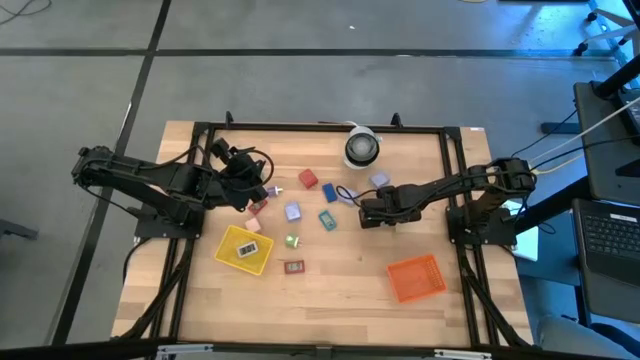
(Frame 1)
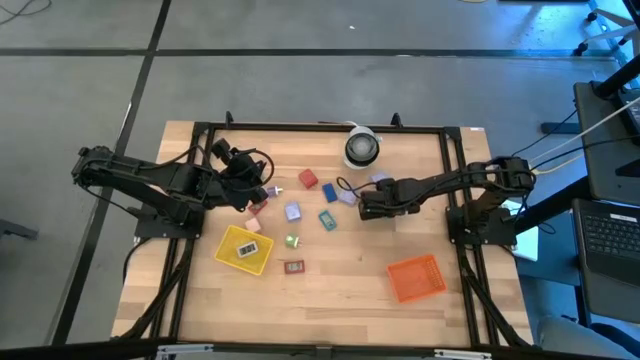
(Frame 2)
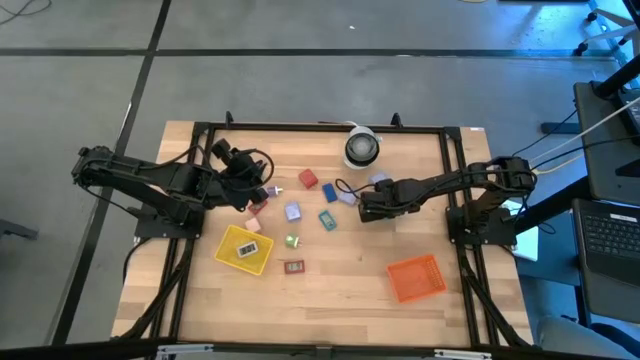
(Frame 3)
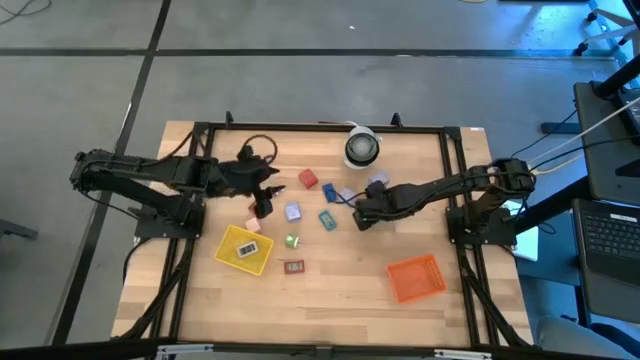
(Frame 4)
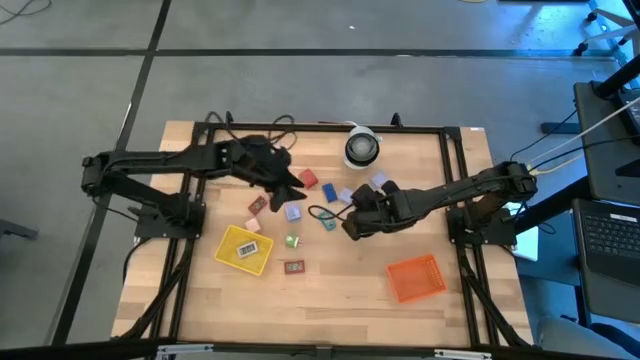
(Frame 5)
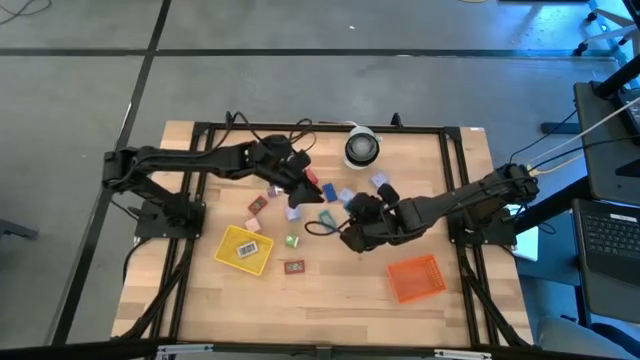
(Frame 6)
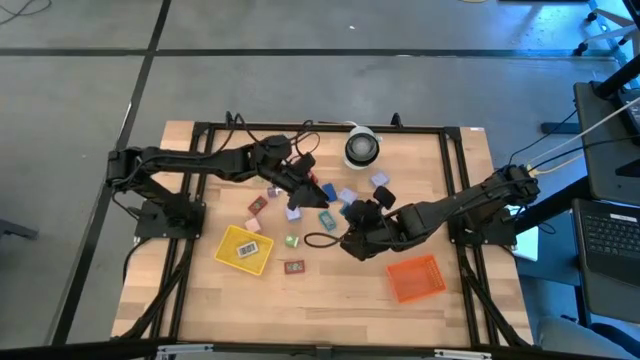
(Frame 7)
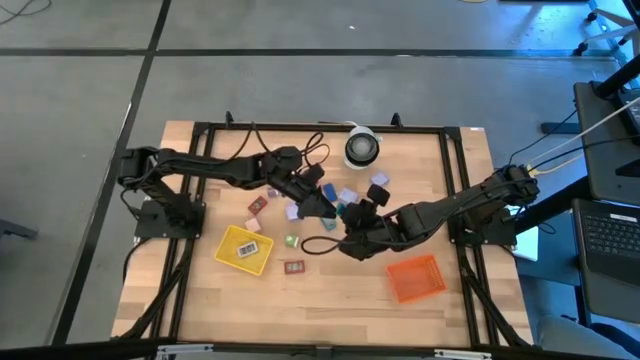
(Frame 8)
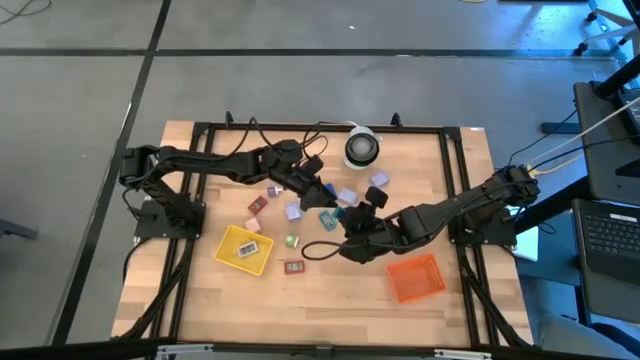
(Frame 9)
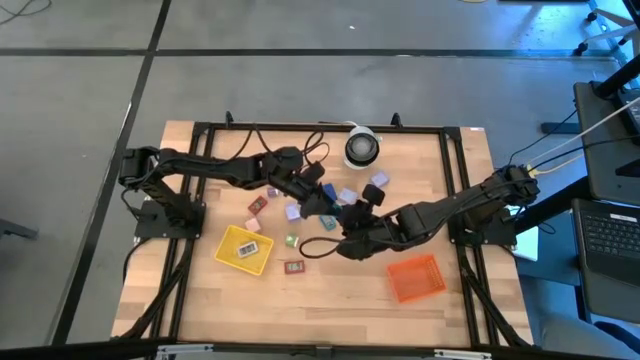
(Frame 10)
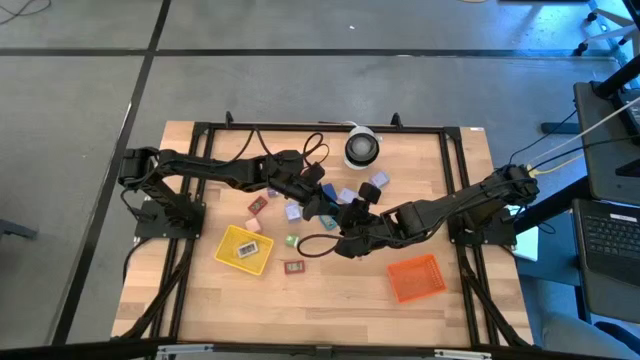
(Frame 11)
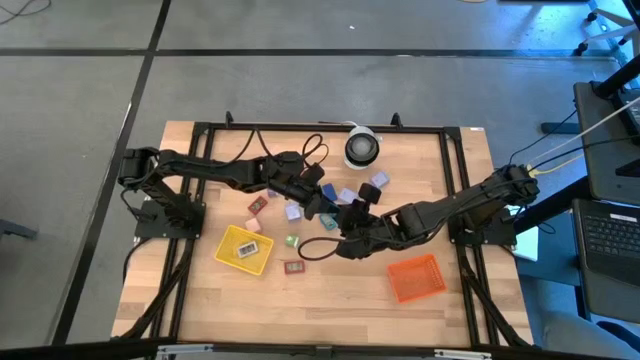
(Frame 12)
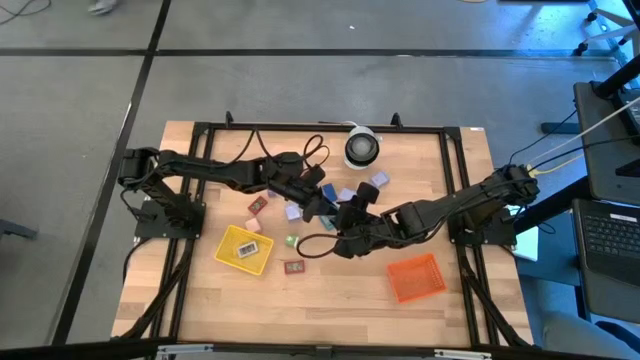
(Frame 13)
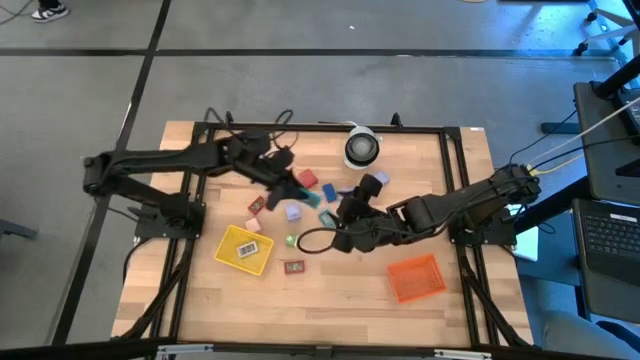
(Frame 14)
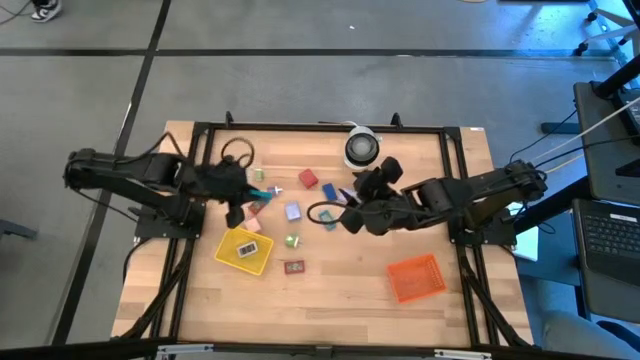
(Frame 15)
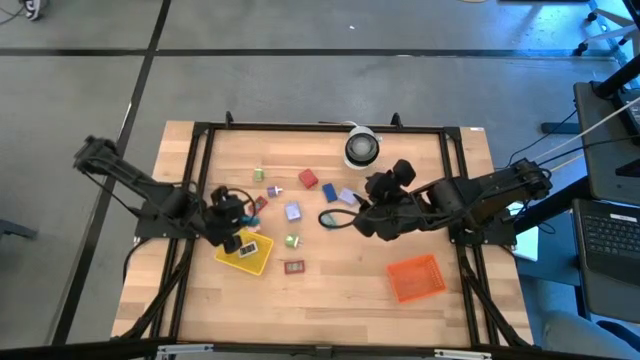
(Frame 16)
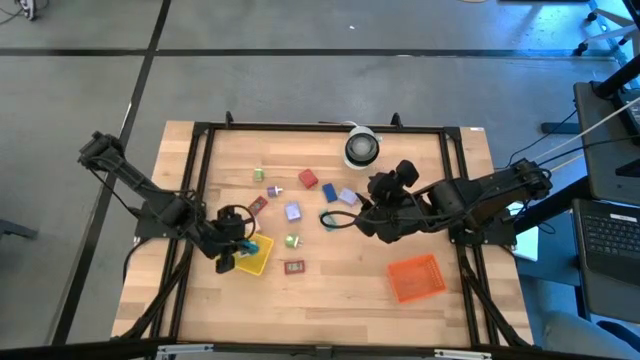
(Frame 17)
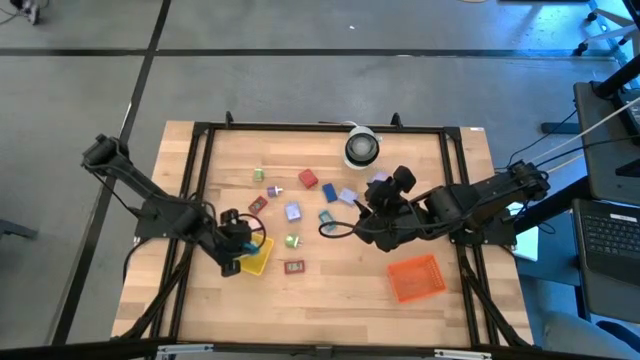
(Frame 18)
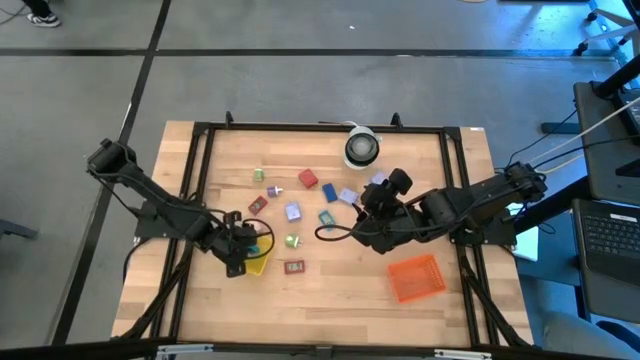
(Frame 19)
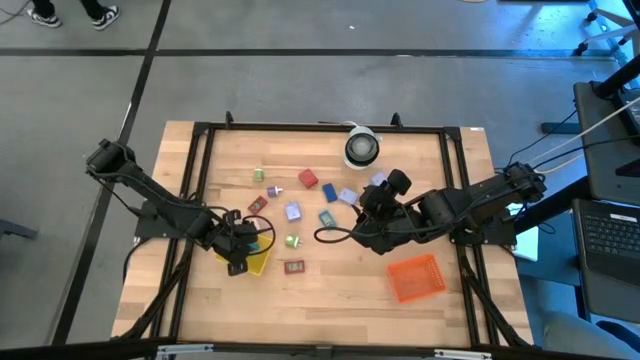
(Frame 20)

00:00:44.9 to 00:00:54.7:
Task: Pick & Place Office items
Put the right light blue digital timer into the yellow bin

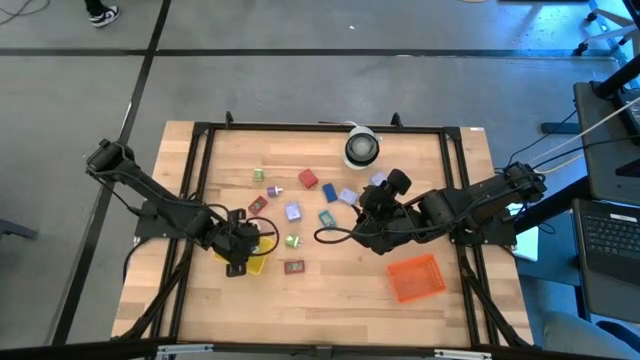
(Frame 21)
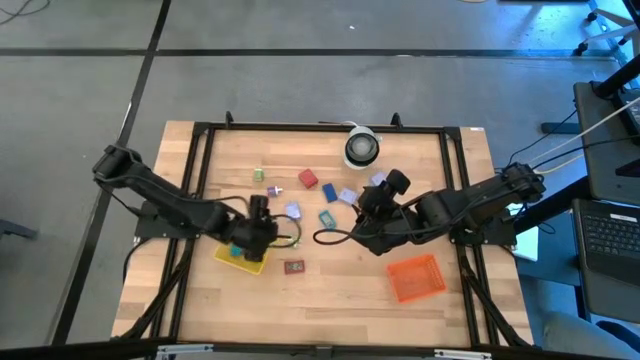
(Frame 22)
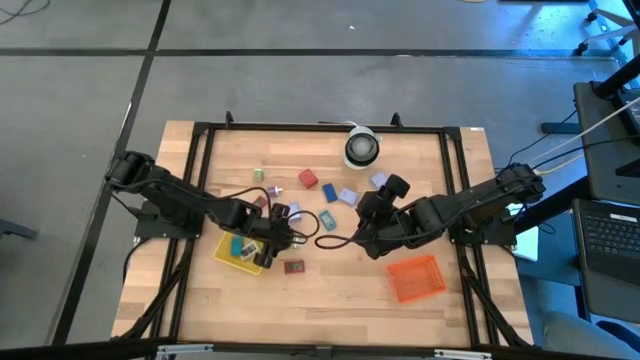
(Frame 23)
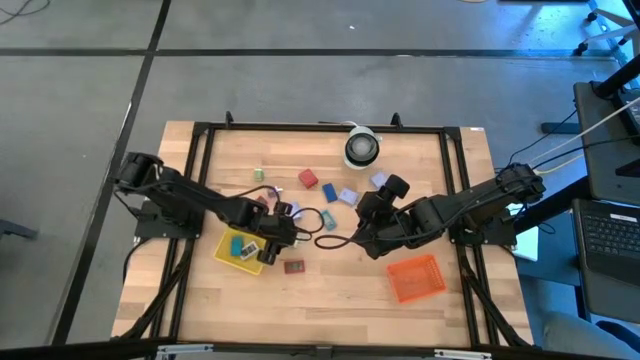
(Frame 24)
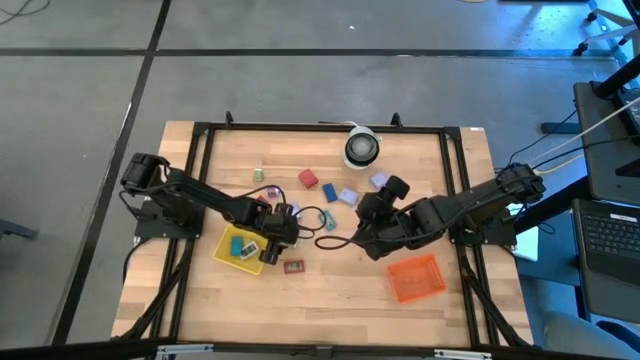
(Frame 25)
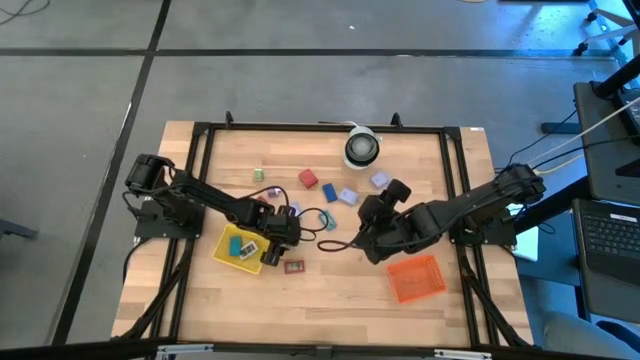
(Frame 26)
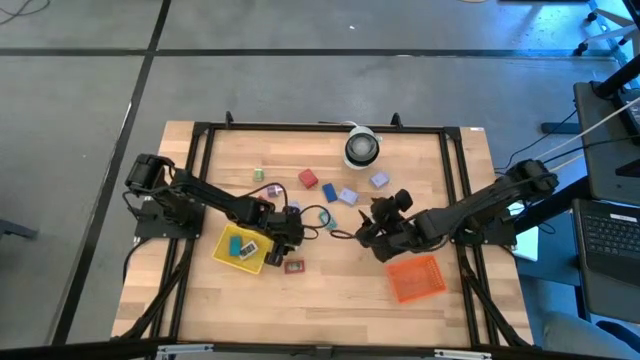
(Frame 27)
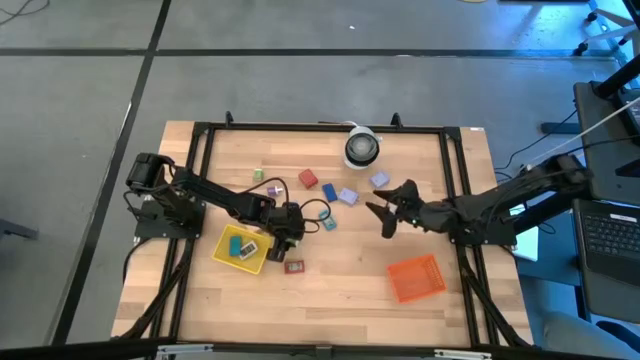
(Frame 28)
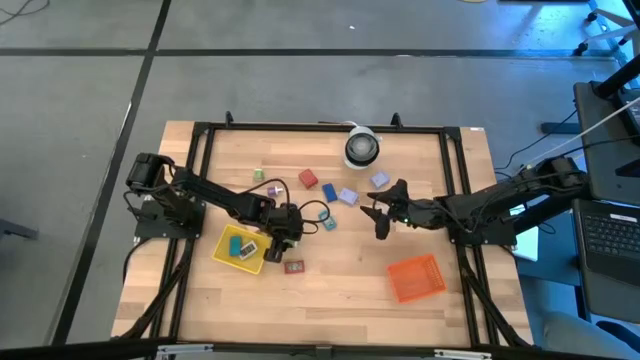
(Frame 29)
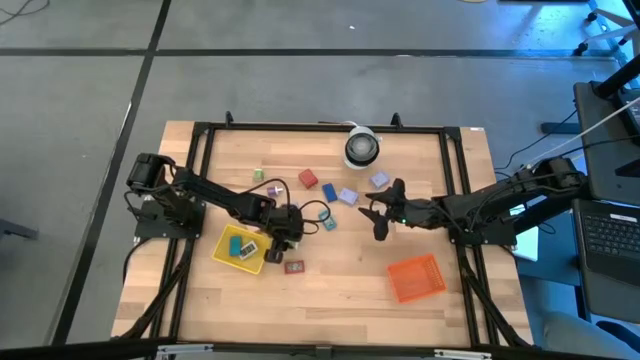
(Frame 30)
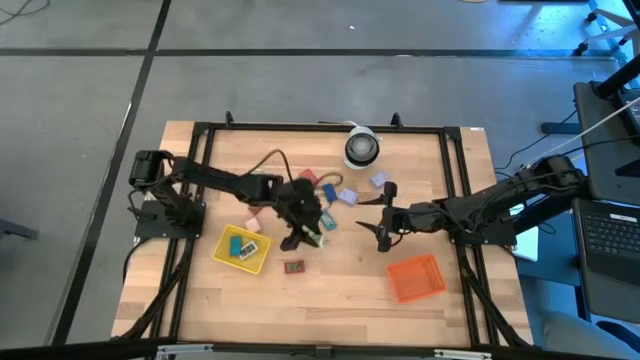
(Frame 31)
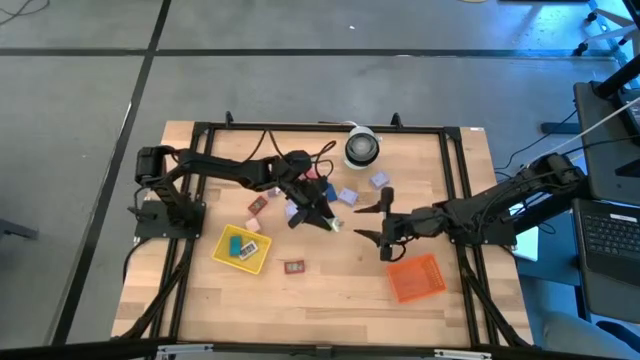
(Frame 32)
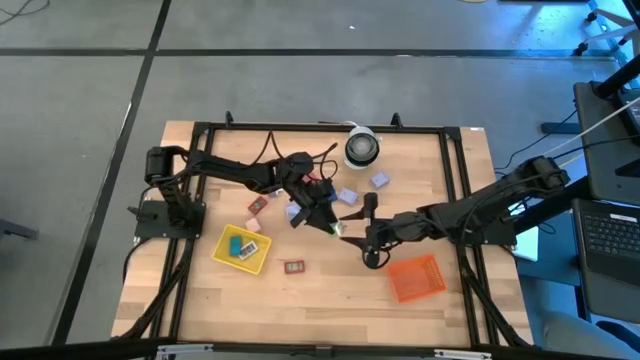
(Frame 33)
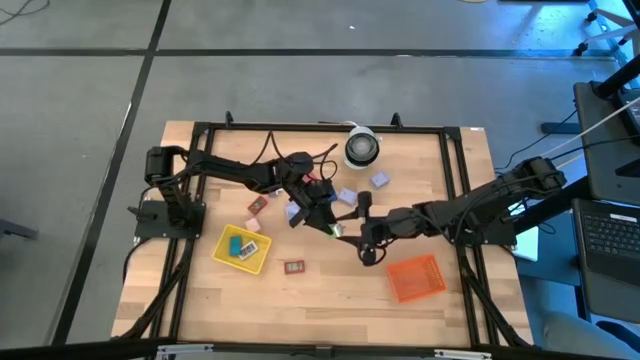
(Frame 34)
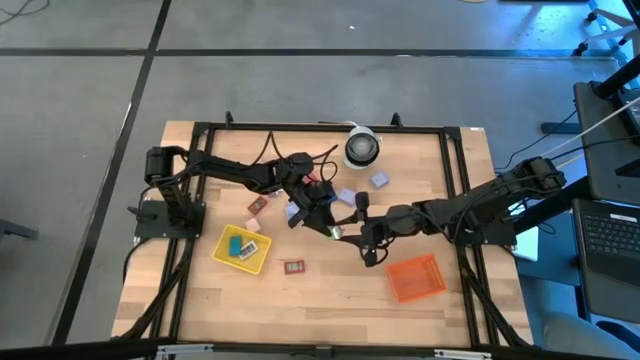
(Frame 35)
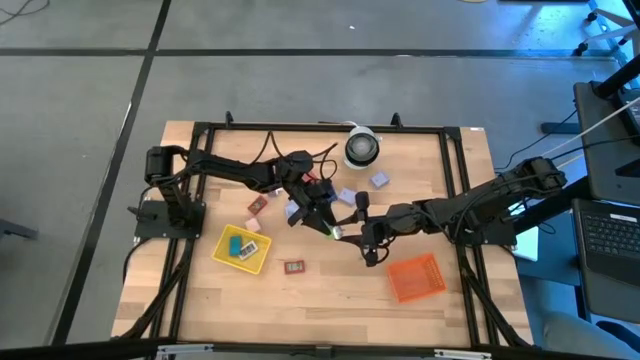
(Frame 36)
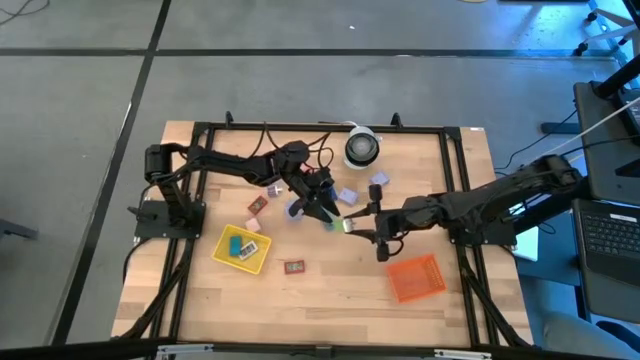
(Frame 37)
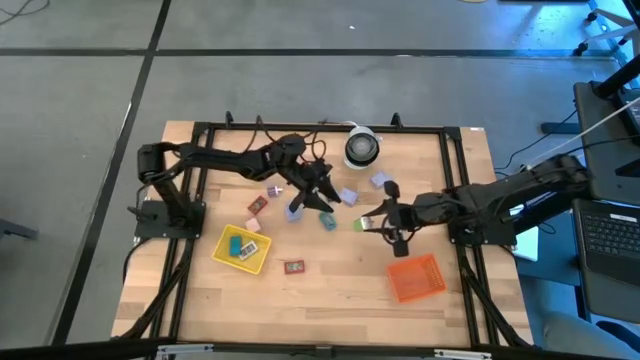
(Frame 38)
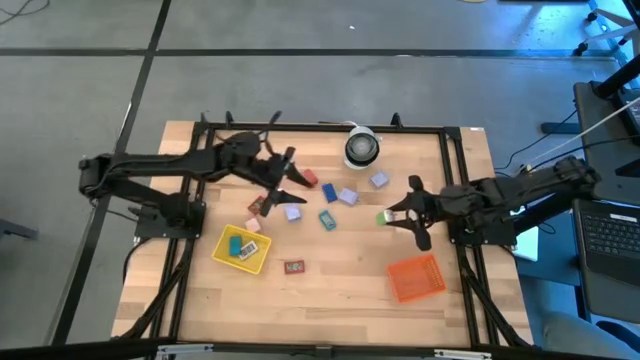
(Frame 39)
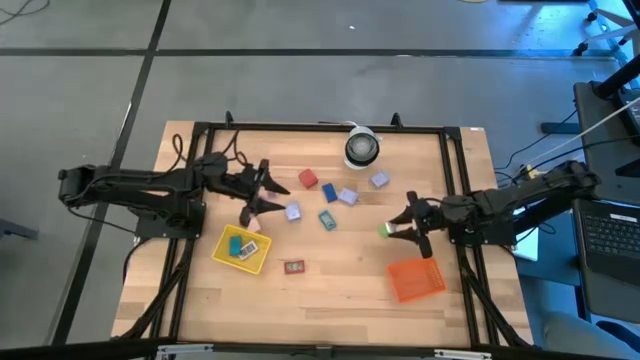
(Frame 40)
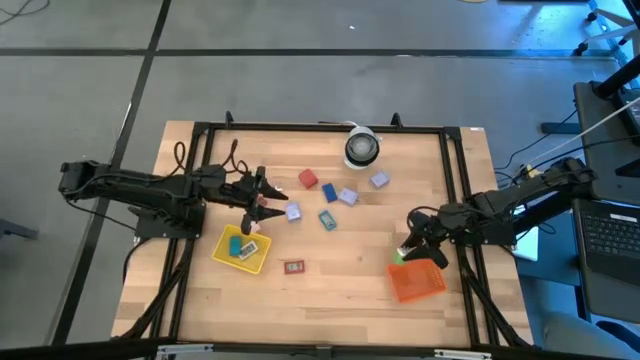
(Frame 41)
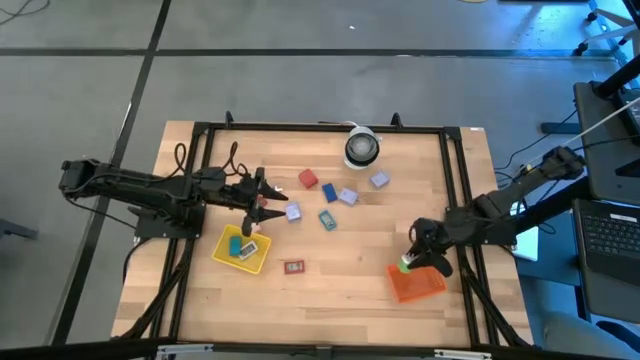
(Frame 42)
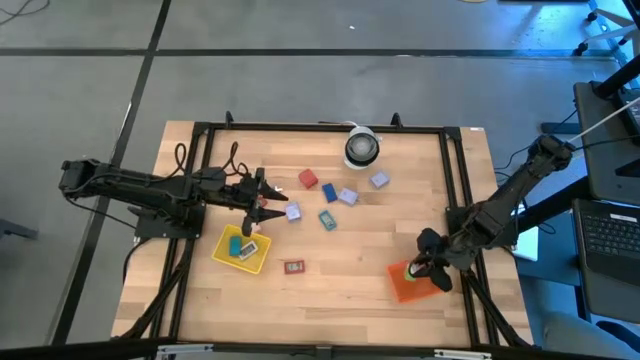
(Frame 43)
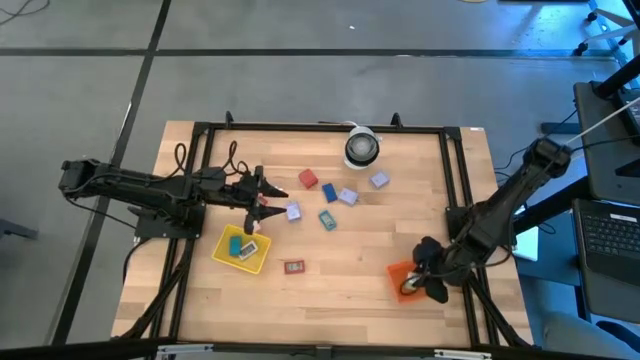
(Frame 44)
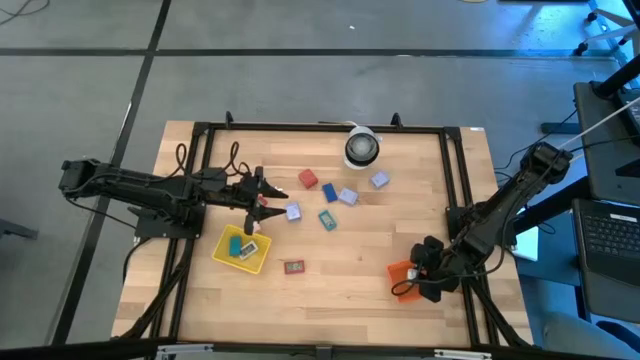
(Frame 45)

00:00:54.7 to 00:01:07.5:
Put the bottom light green charger adapter into the orange bin
